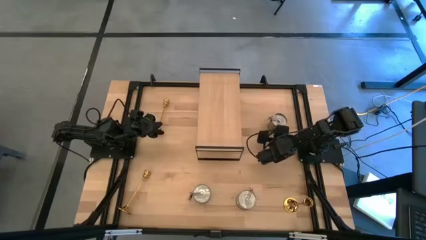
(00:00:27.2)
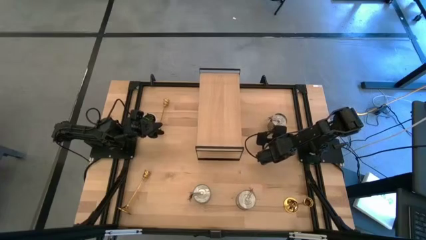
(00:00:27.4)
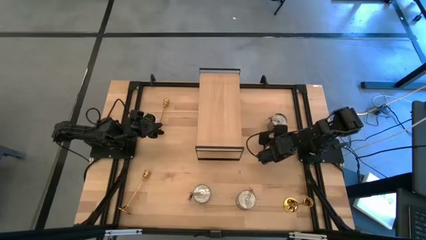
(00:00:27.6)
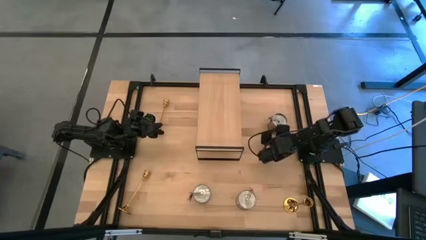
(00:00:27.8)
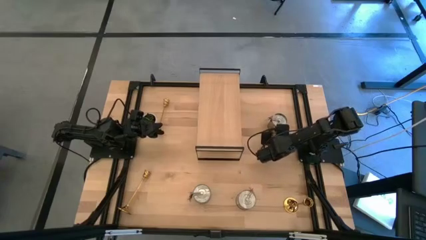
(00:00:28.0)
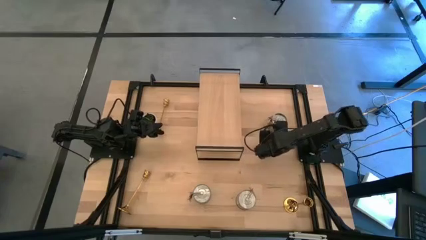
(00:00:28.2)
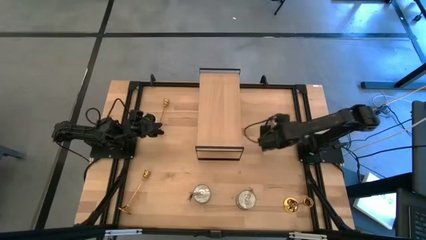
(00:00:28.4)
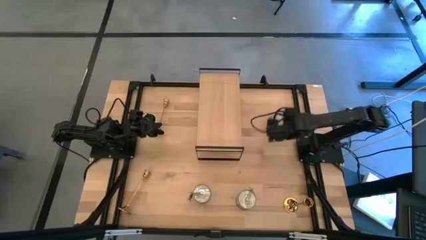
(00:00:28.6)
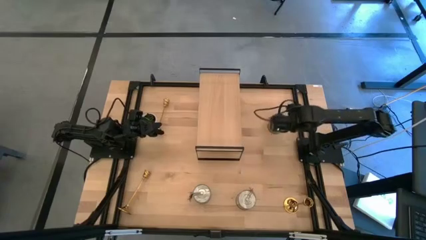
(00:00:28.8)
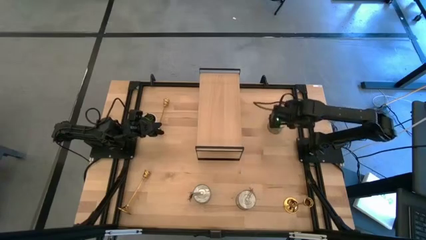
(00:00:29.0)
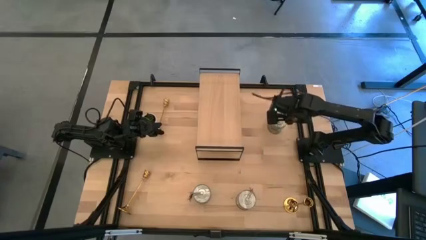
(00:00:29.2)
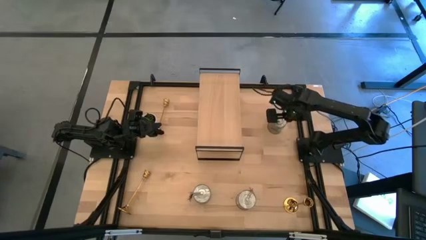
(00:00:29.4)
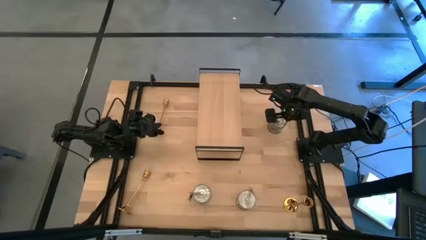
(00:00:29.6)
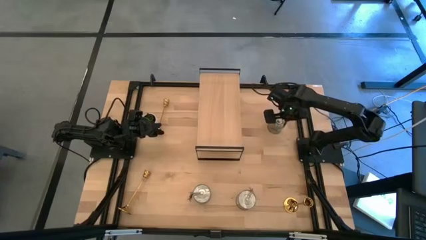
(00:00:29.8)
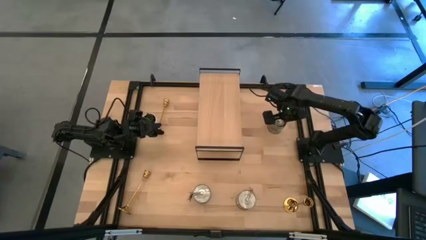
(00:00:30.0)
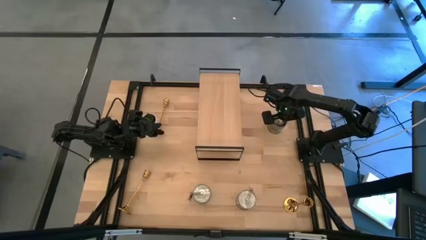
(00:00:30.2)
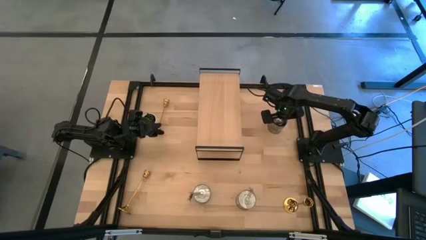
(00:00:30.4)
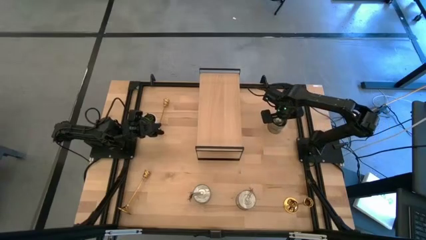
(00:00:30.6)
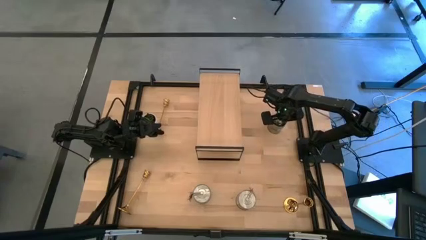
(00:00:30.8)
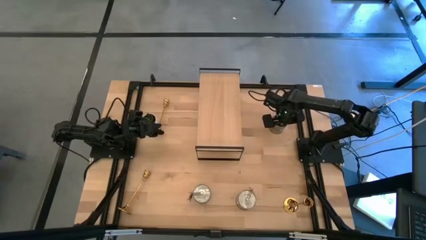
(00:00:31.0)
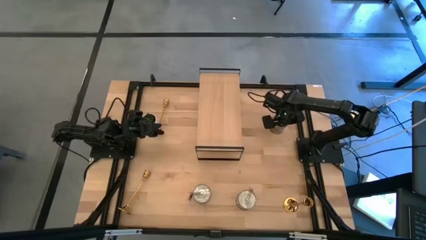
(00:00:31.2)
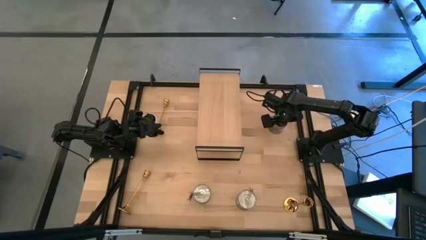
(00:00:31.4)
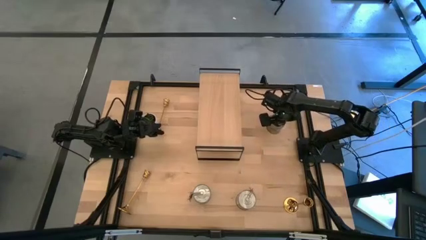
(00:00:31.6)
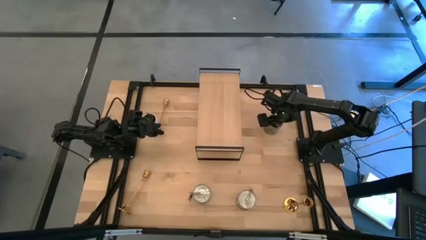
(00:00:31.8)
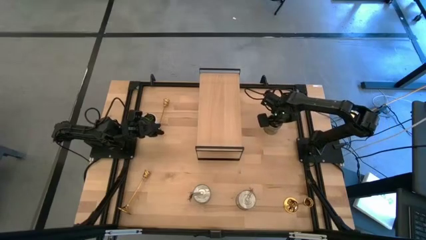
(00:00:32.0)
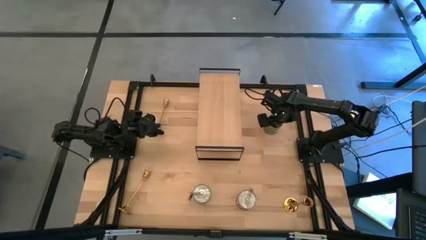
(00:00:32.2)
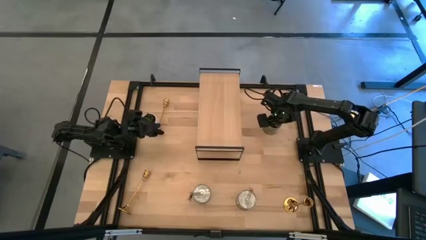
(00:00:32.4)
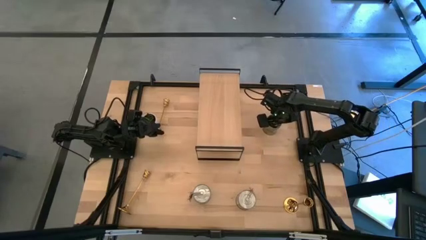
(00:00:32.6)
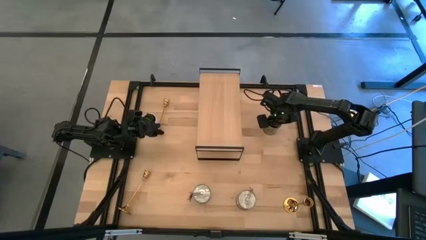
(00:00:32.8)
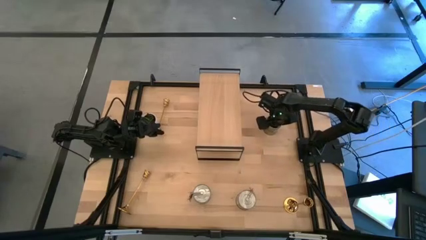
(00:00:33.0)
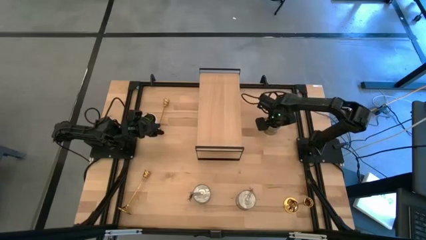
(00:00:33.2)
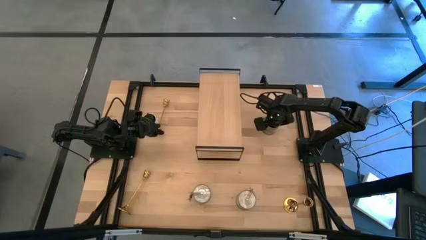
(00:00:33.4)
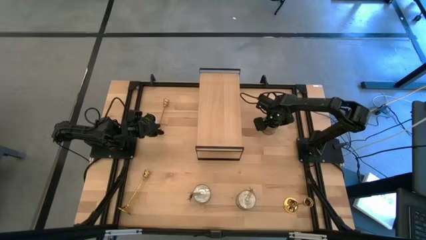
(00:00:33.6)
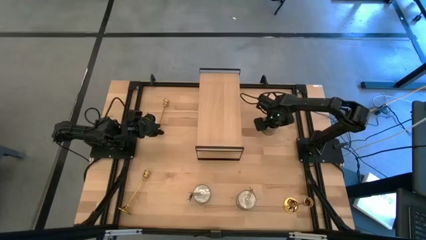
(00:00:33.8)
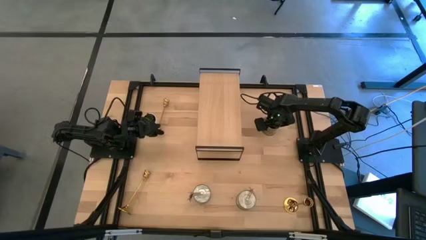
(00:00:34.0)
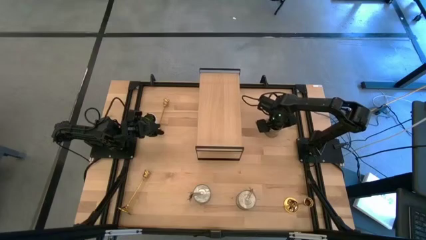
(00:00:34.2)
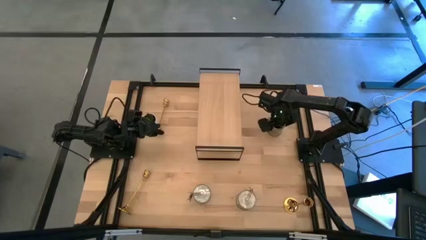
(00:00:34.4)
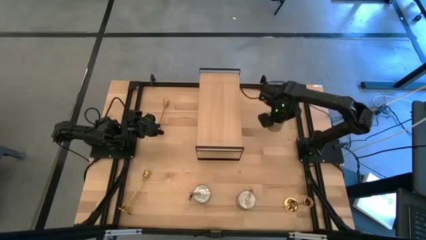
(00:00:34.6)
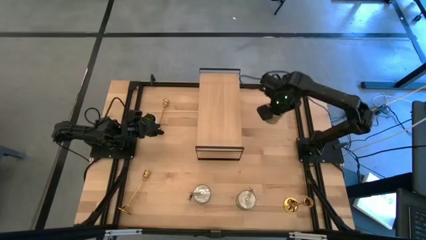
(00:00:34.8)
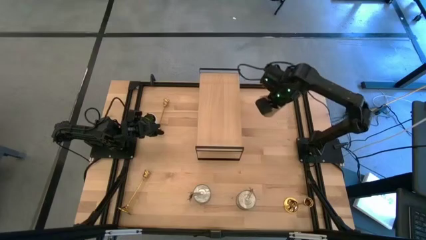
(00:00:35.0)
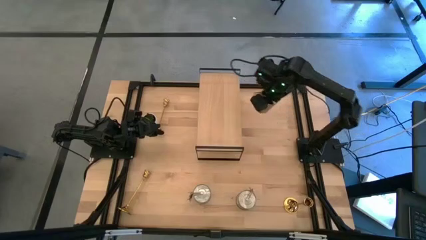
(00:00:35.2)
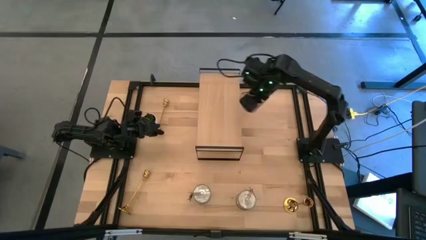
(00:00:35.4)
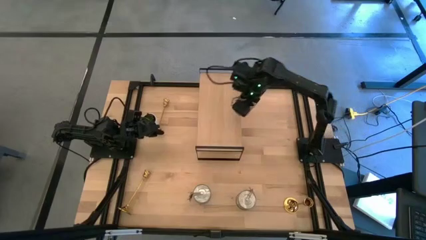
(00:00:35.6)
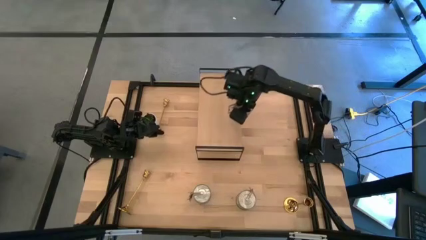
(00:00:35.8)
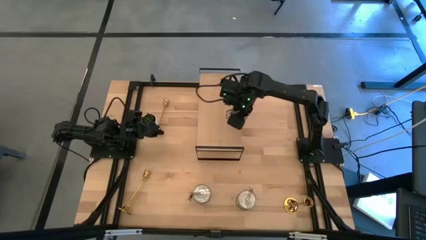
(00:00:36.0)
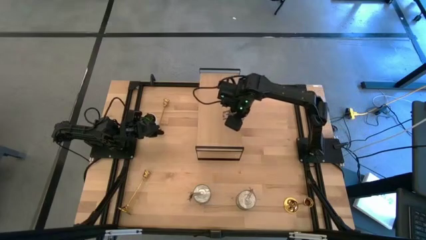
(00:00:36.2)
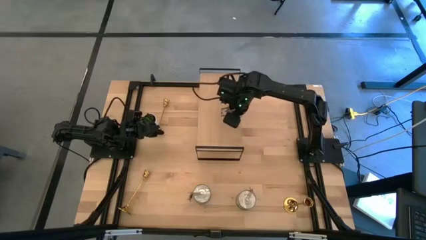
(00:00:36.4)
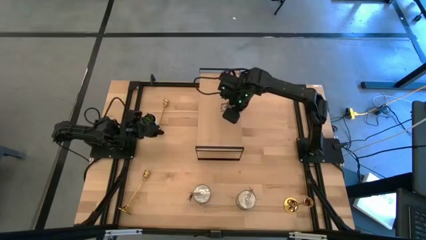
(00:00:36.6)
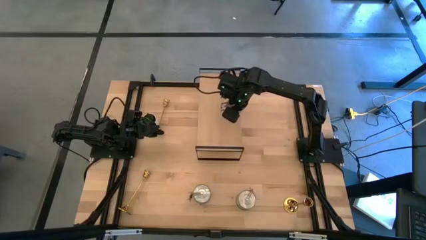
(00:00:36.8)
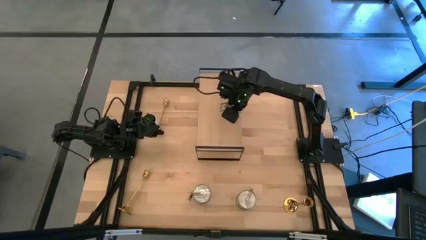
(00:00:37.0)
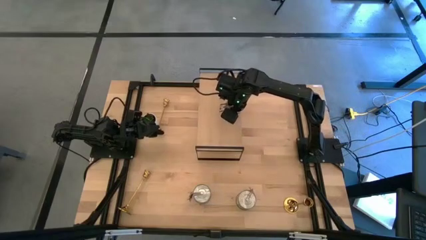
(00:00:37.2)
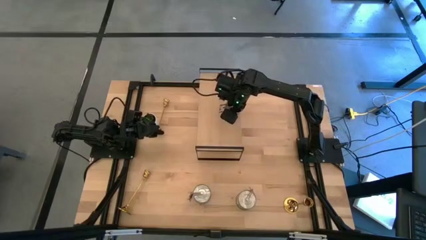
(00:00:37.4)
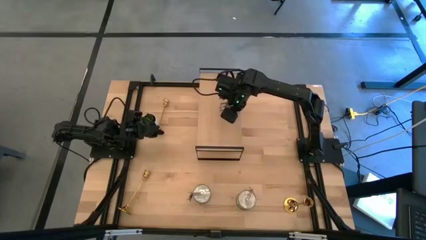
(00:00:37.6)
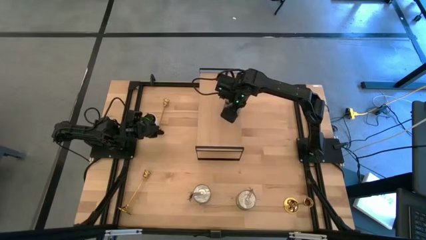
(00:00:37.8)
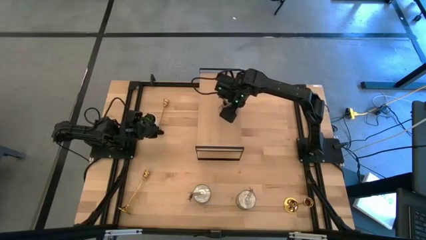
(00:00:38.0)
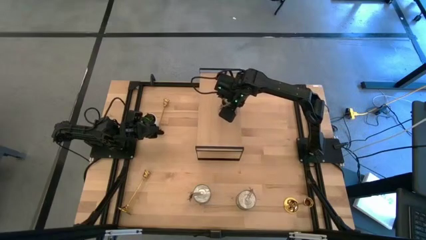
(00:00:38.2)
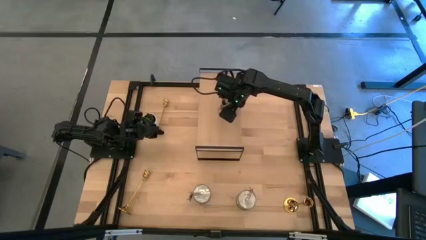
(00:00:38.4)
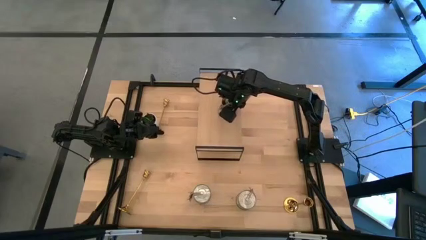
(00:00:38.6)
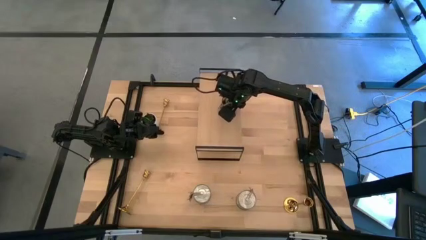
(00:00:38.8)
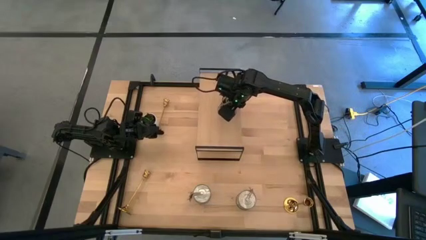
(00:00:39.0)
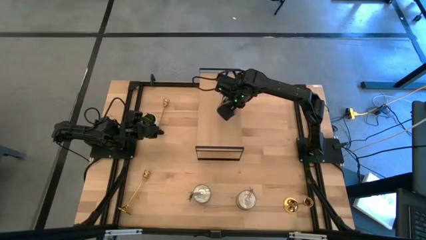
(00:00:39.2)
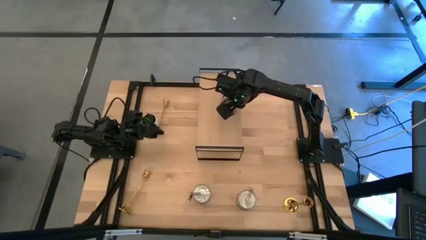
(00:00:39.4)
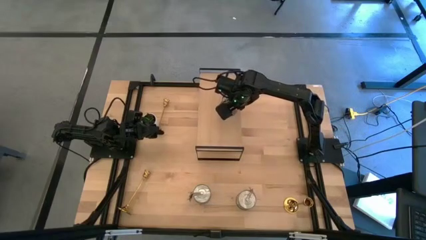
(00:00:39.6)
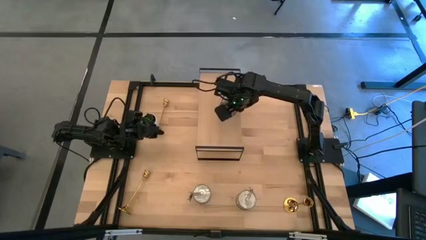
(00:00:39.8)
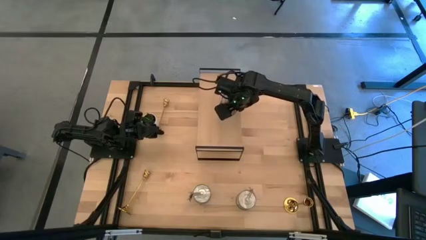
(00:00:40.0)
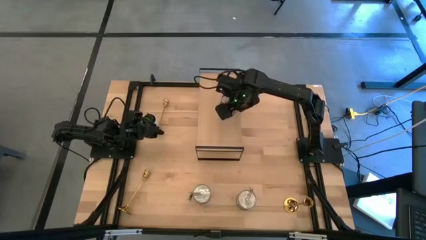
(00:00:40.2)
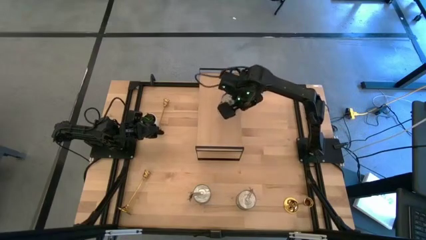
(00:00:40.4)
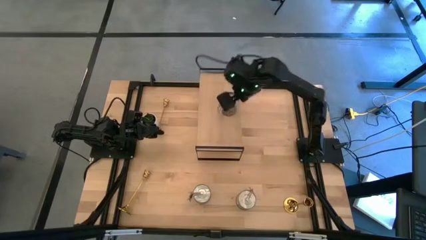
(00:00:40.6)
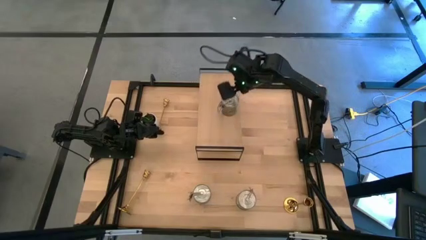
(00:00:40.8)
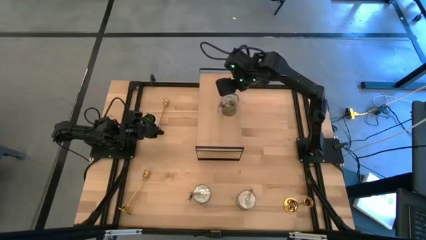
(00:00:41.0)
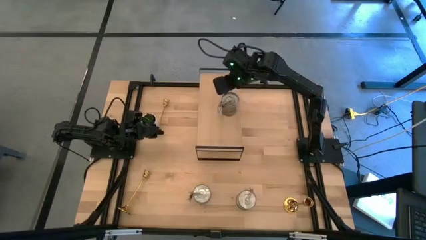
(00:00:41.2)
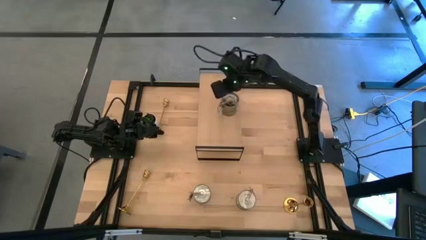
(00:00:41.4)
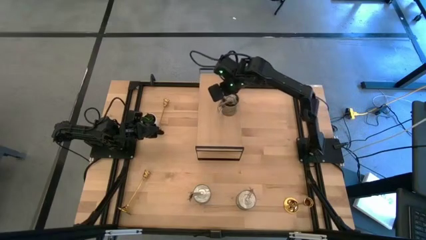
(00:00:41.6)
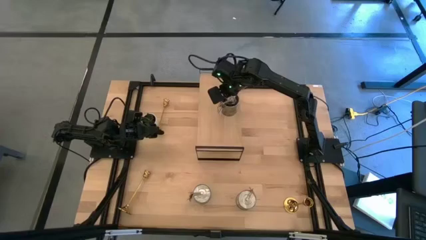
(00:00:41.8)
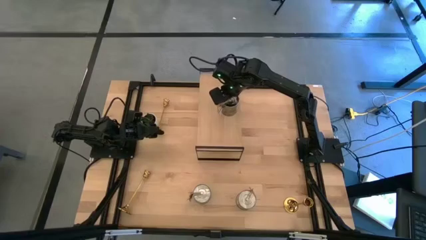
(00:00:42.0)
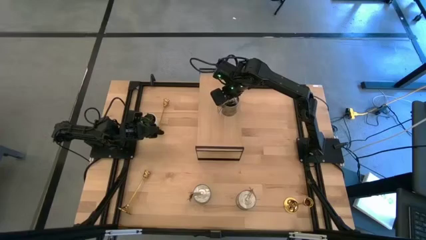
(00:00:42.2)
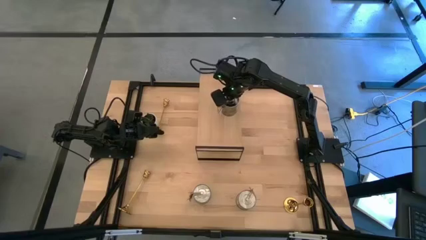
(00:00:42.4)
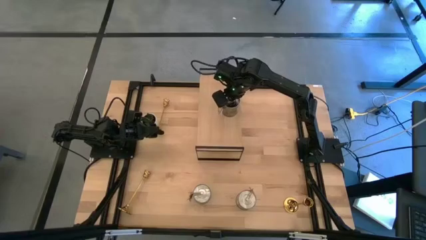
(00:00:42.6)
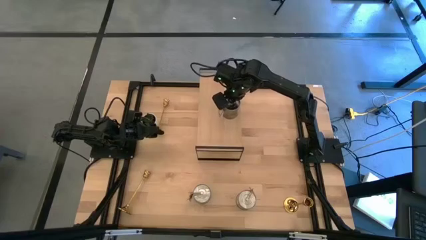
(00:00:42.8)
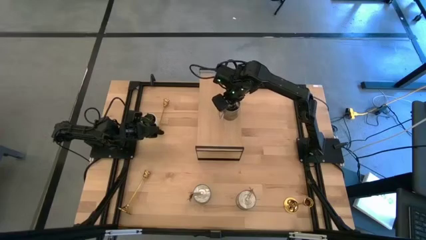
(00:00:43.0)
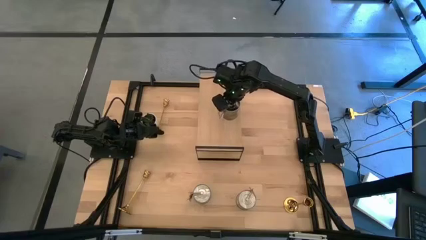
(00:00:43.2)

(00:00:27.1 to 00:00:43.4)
Task: Pick & Place candle stick holders
Put the top silver scented candle on the shelf
